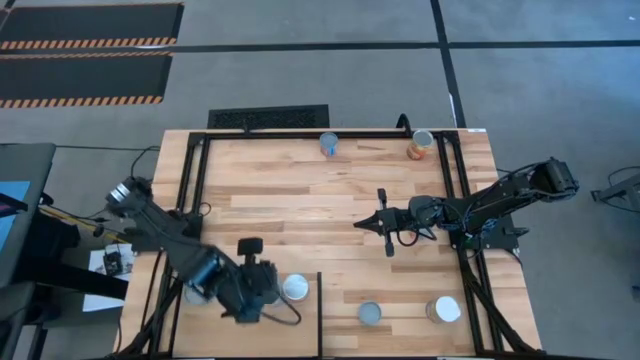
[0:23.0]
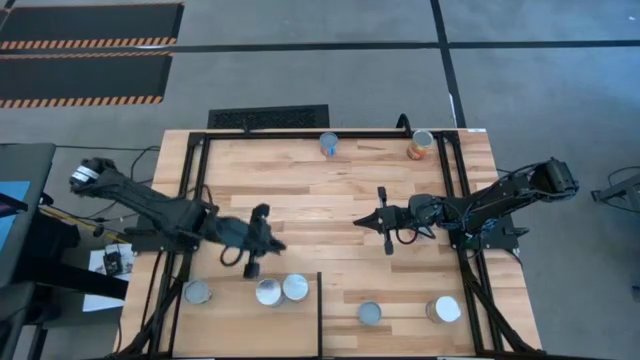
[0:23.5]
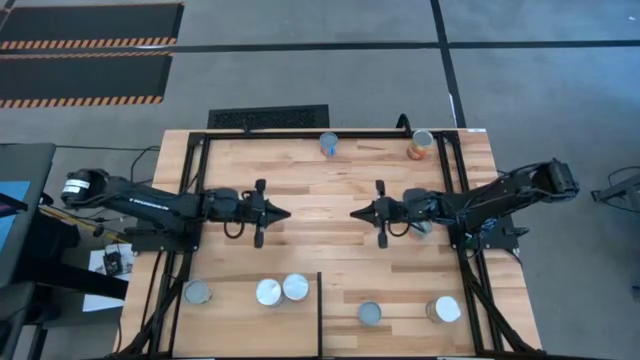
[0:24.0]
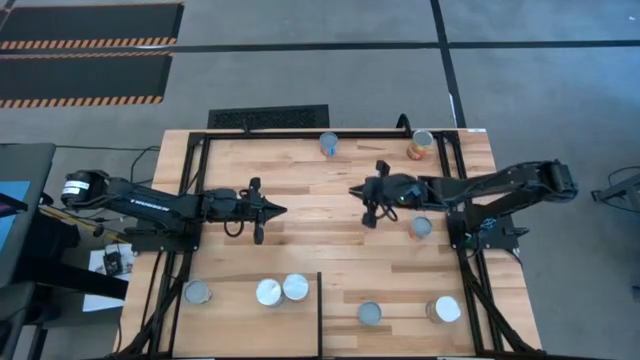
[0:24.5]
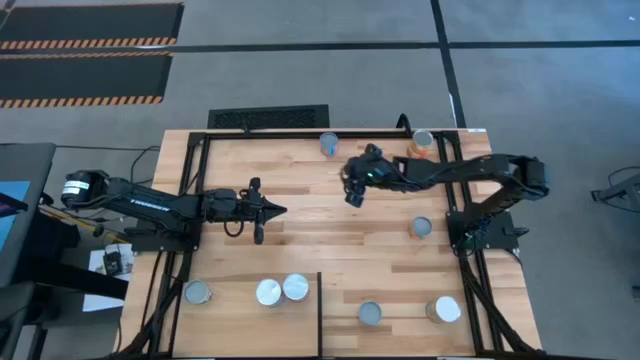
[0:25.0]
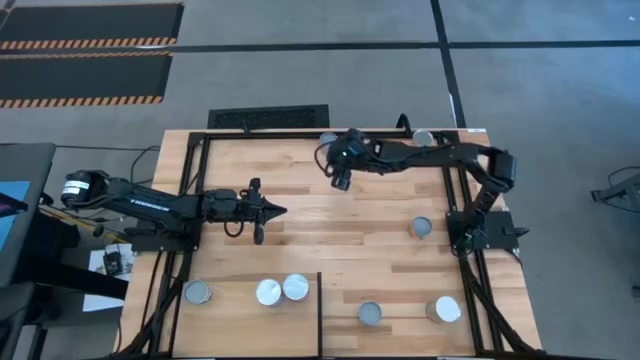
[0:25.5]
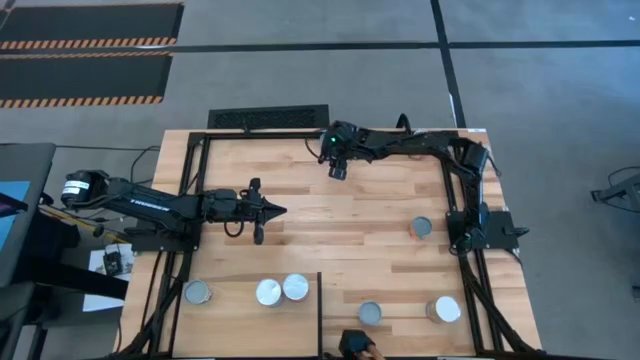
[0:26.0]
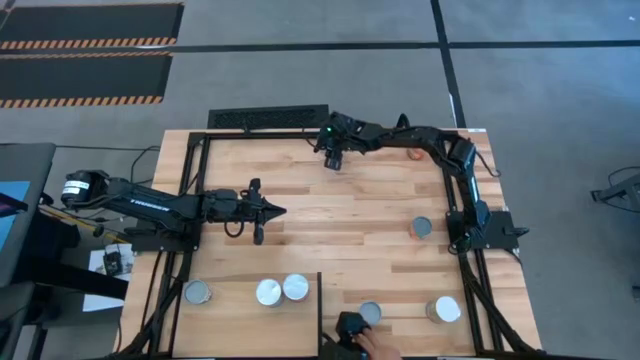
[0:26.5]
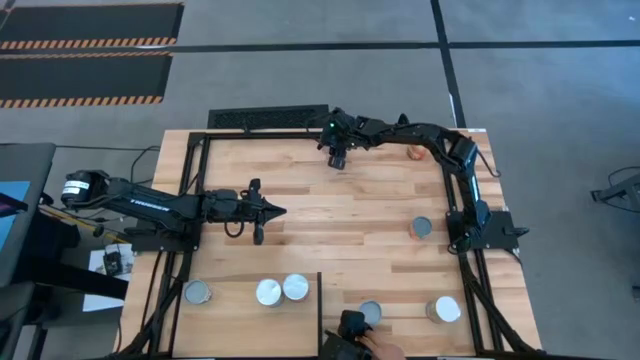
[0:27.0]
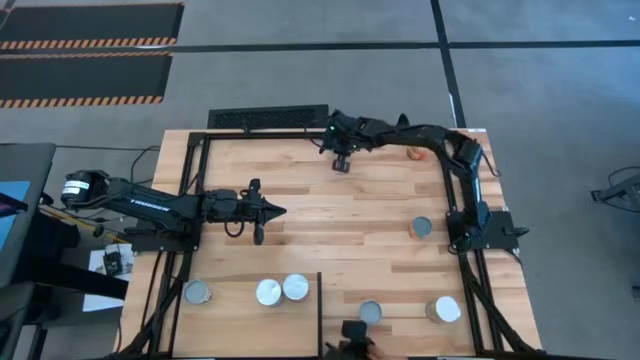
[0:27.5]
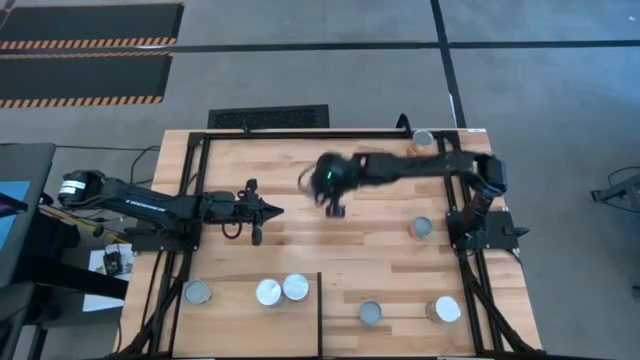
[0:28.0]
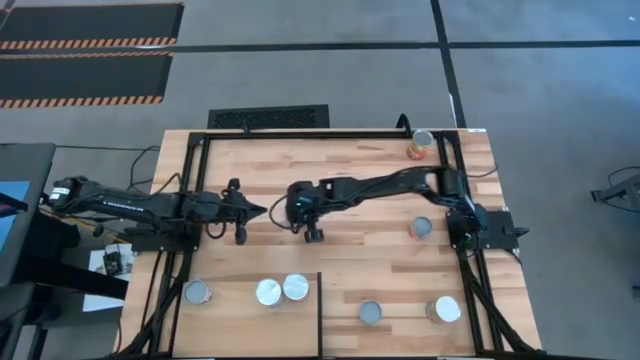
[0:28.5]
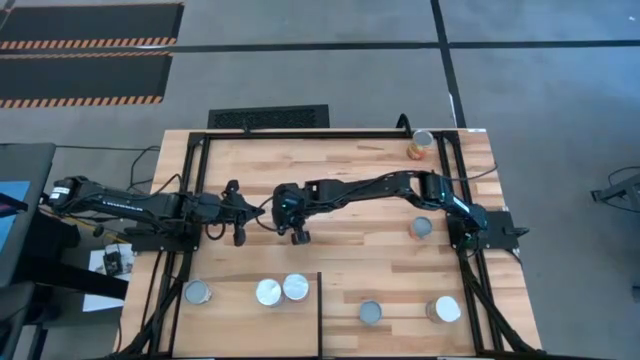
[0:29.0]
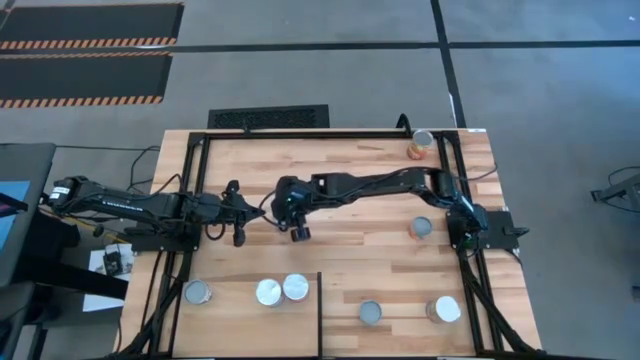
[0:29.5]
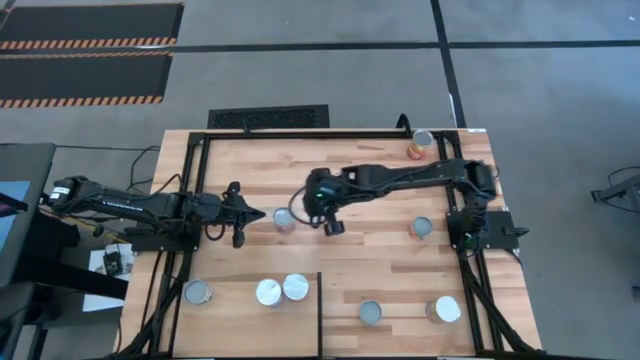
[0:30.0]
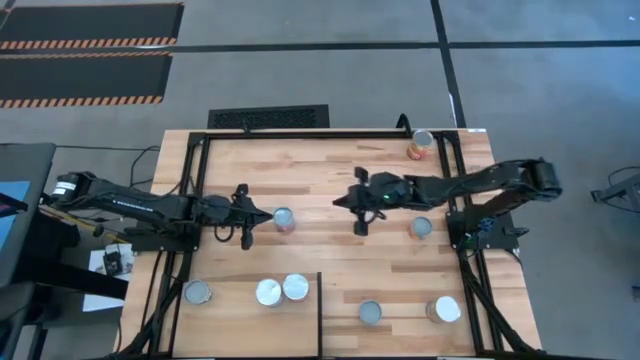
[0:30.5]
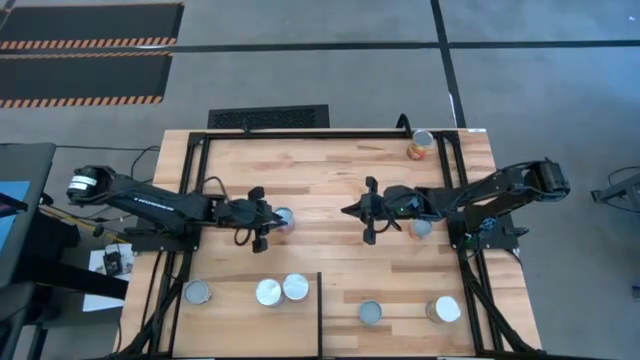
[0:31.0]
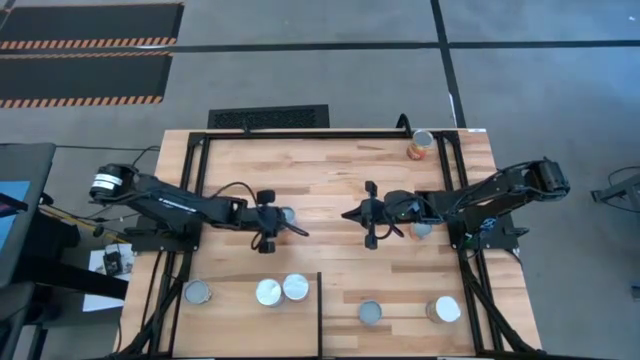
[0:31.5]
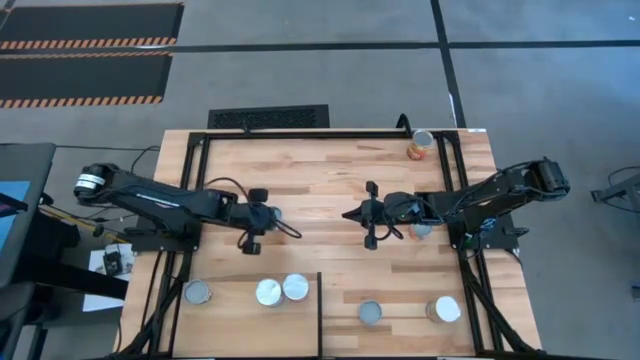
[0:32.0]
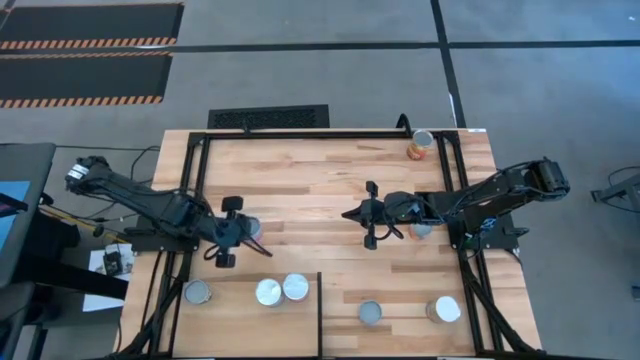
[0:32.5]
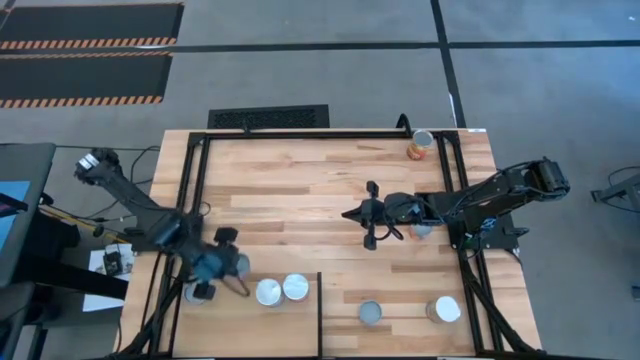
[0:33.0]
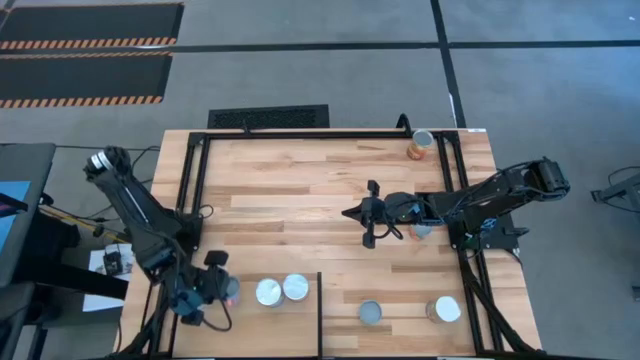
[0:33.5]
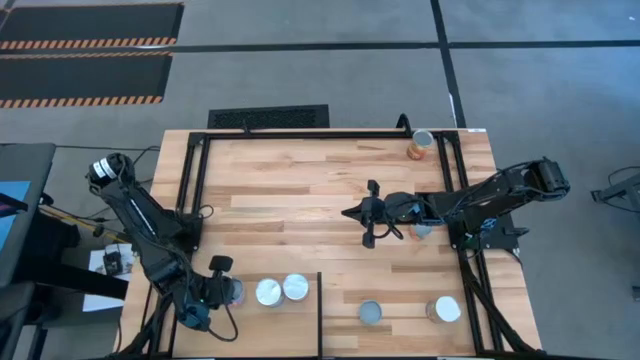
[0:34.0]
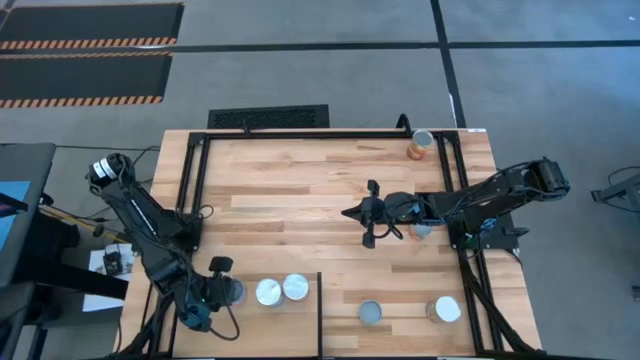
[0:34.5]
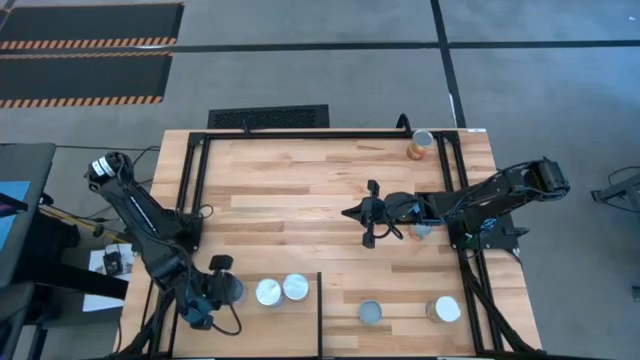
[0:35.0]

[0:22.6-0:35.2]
Task: Pick and place cans onto a shelf
Put the small canned corn onto the shelf

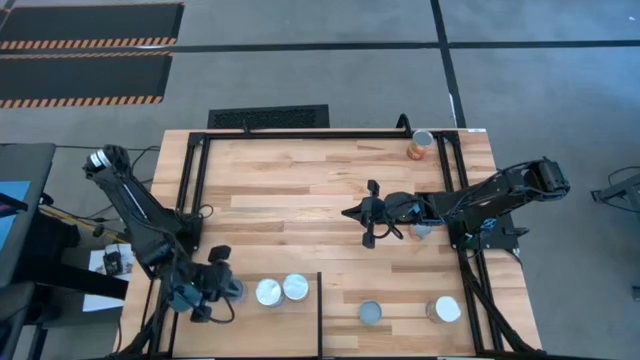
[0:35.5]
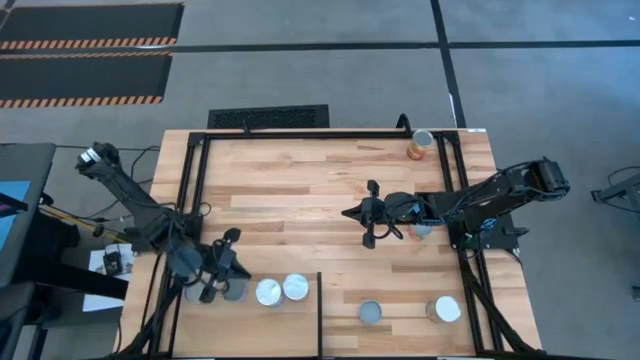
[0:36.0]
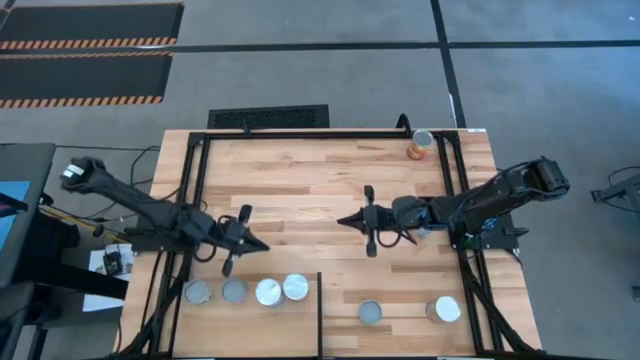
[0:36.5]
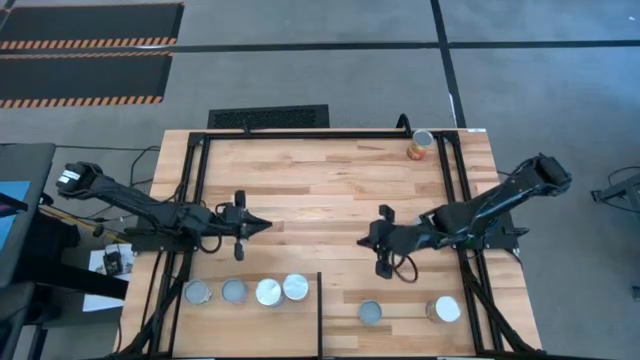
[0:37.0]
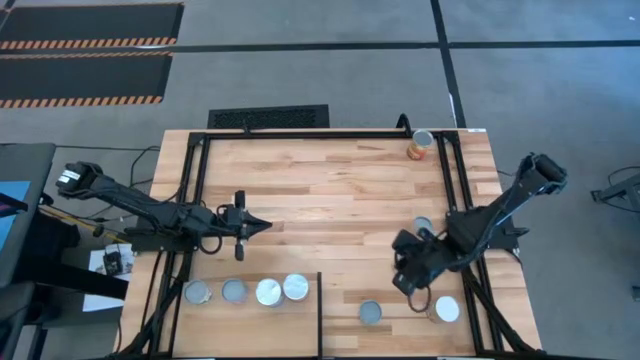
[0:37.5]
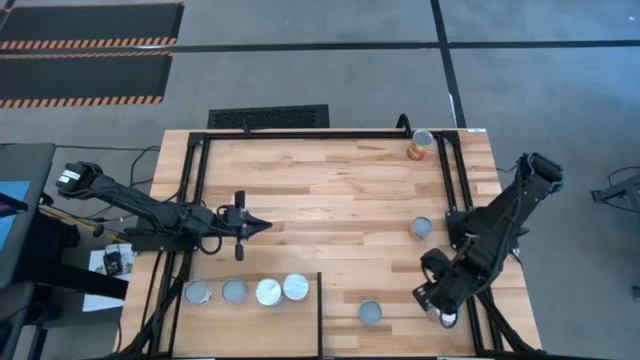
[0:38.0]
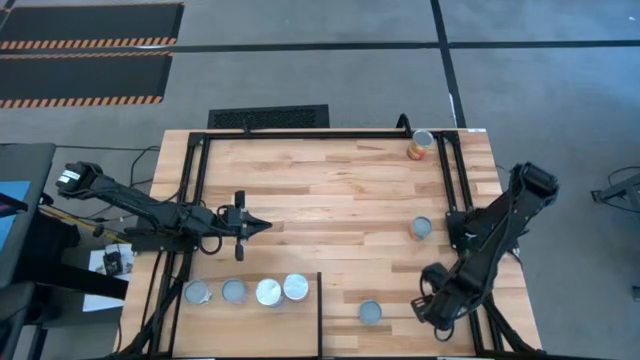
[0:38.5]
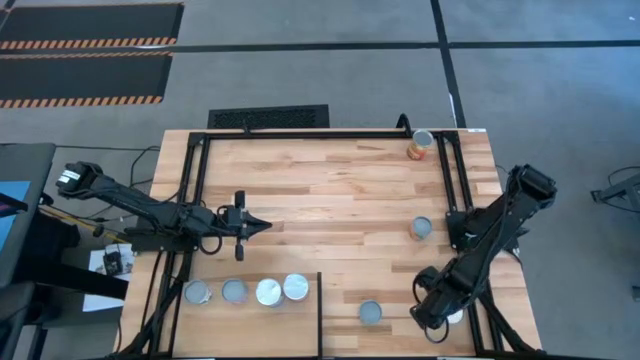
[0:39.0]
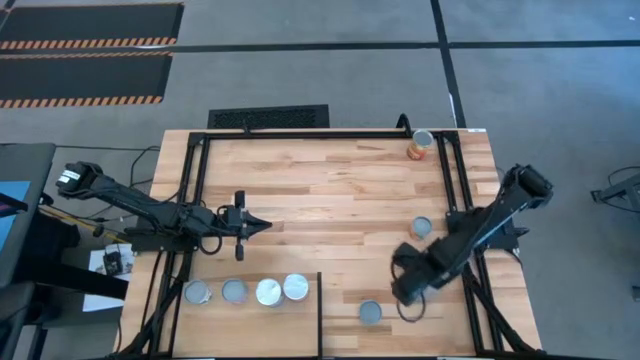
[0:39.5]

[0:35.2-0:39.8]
Put the canned peaches can onto the shelf

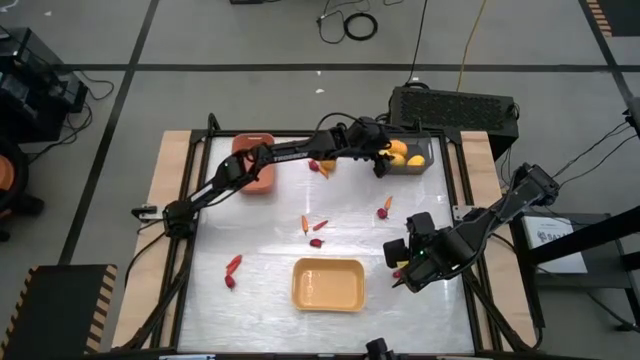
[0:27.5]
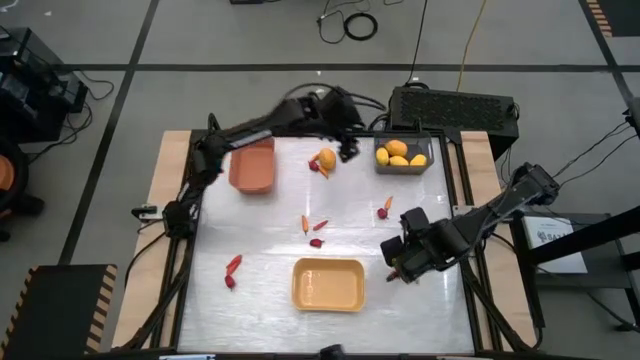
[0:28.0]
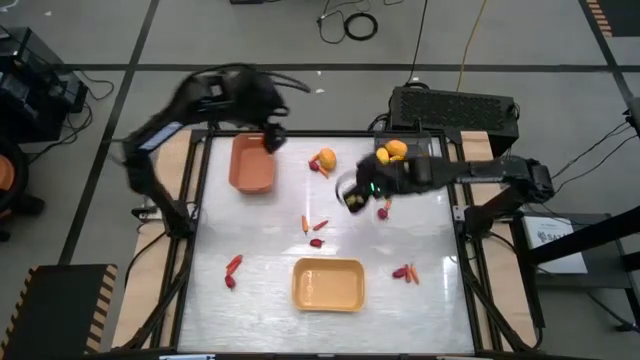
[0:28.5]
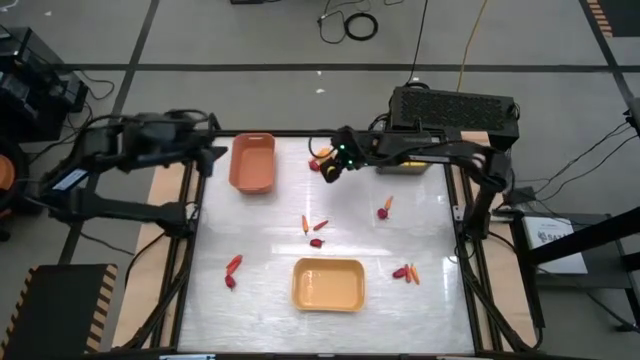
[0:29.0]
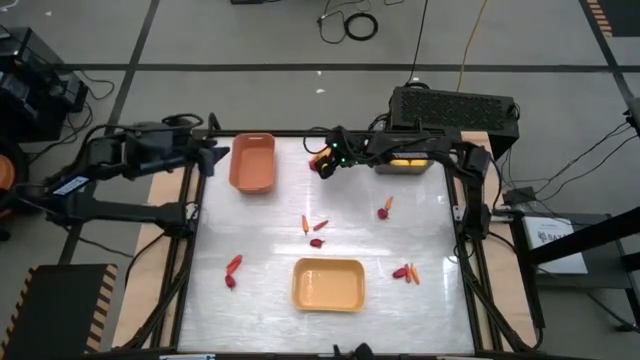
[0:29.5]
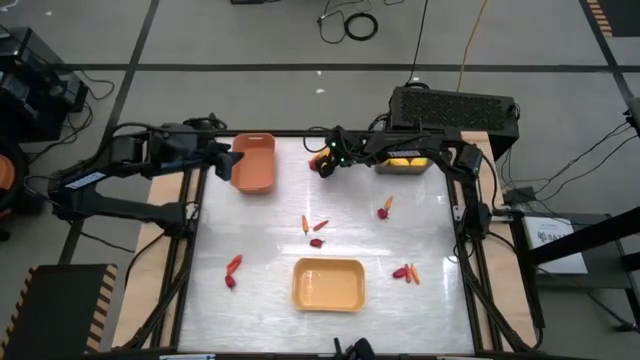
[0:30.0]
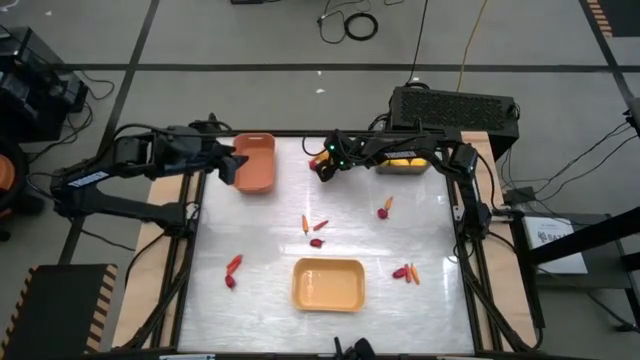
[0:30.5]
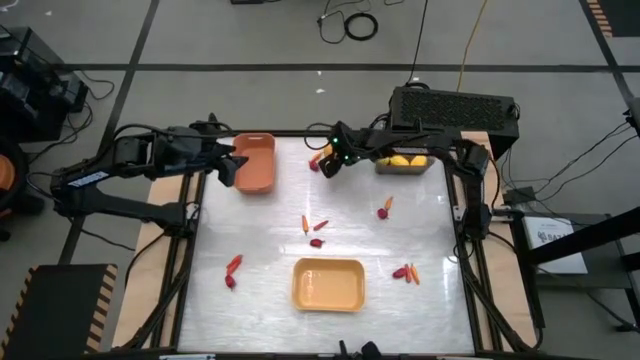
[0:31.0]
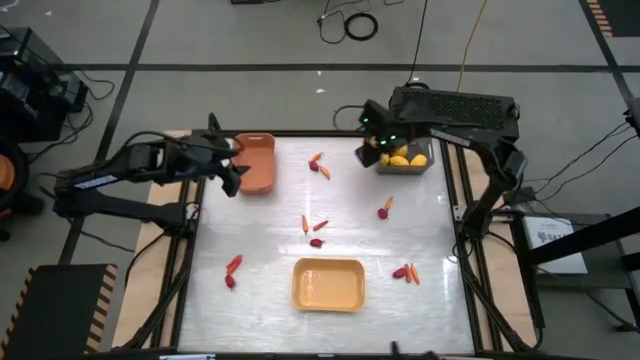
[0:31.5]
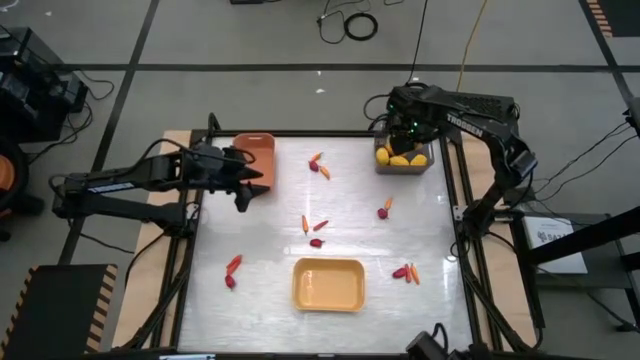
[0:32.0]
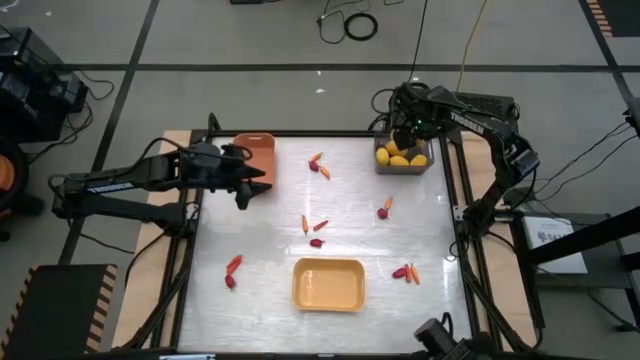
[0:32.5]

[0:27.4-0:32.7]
Task: Sort produce into baskets
Put the lemon into the gray bin
